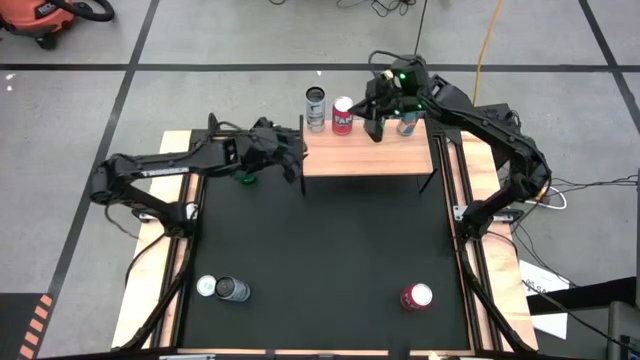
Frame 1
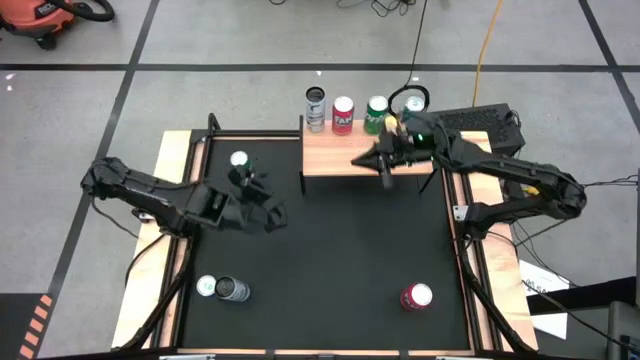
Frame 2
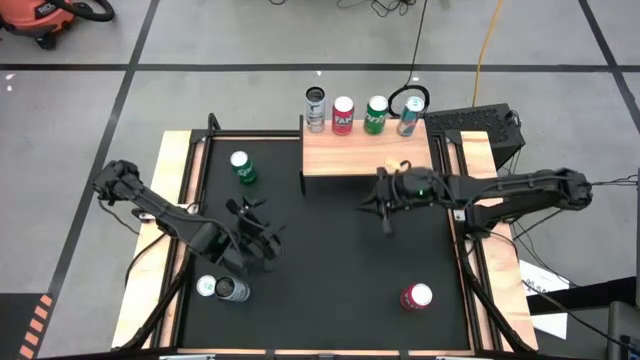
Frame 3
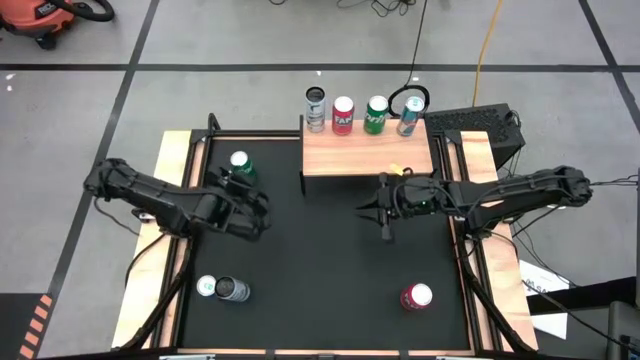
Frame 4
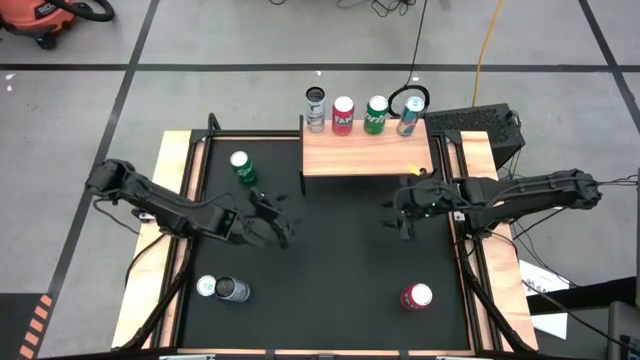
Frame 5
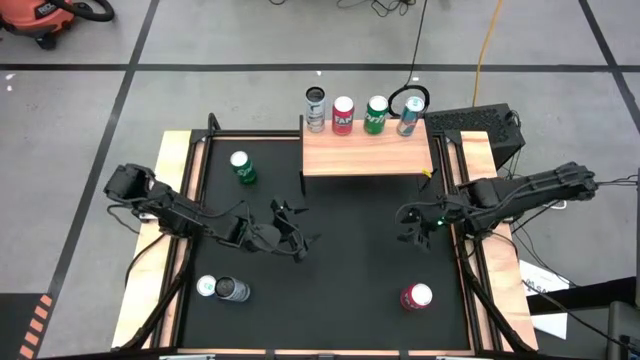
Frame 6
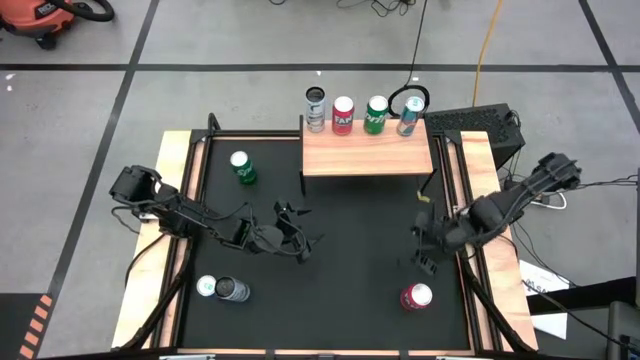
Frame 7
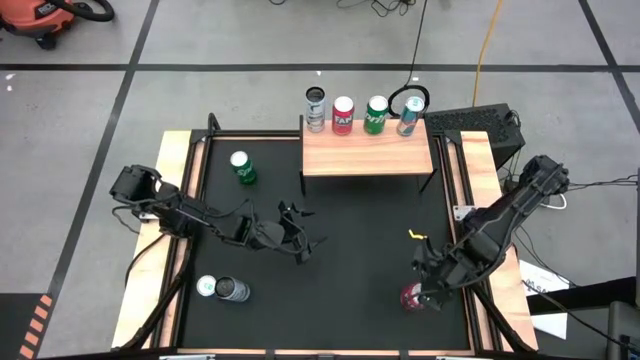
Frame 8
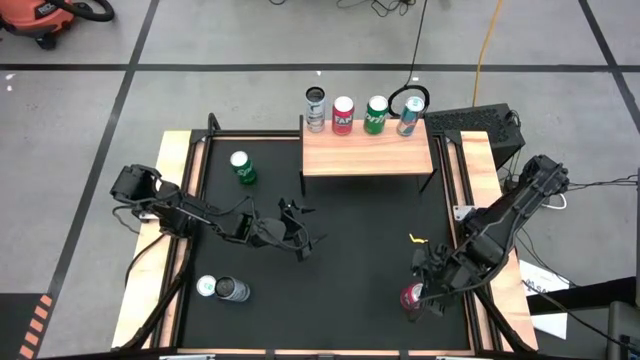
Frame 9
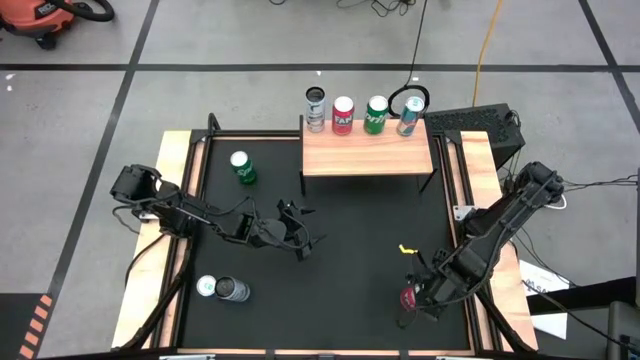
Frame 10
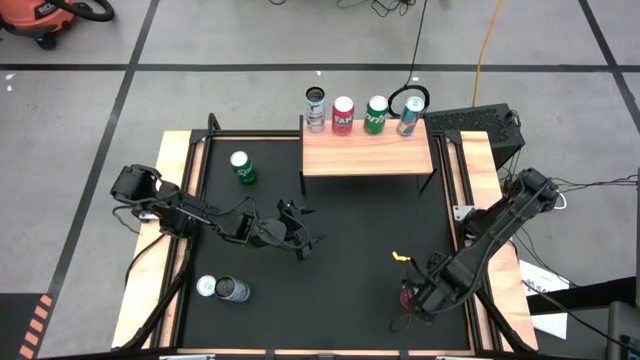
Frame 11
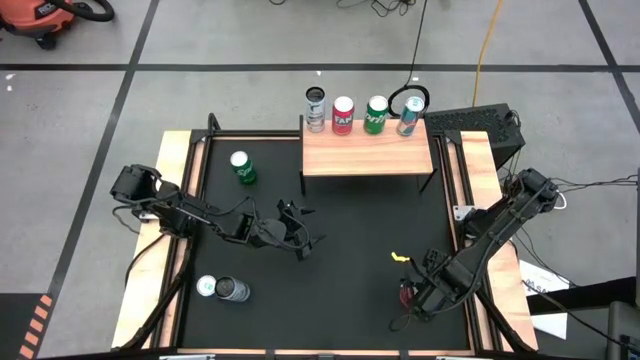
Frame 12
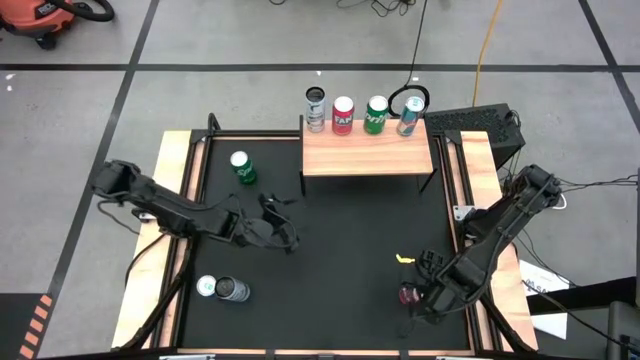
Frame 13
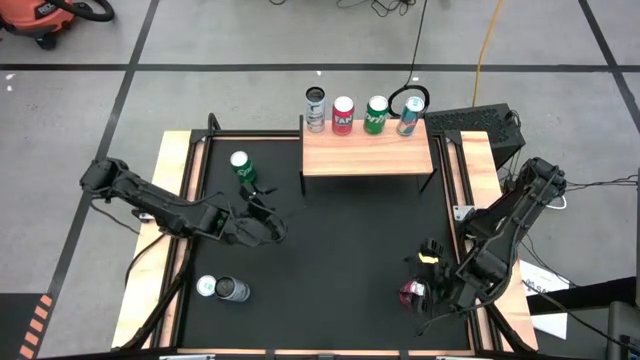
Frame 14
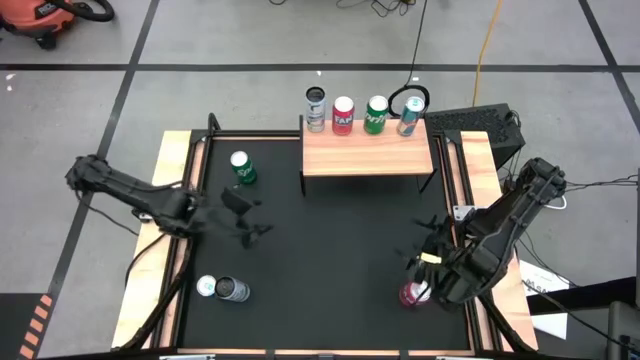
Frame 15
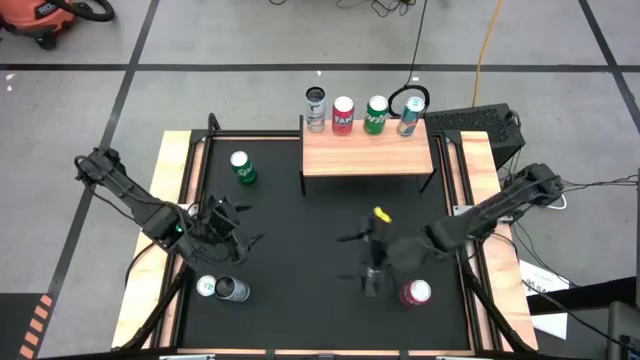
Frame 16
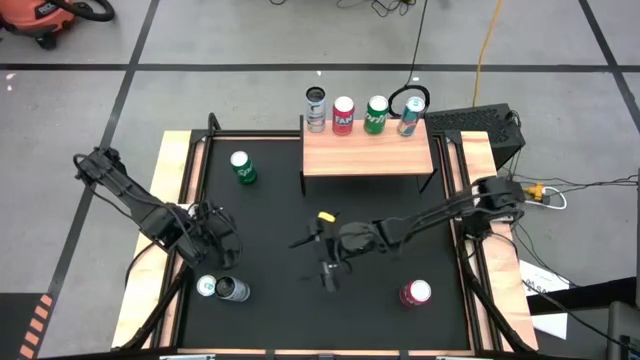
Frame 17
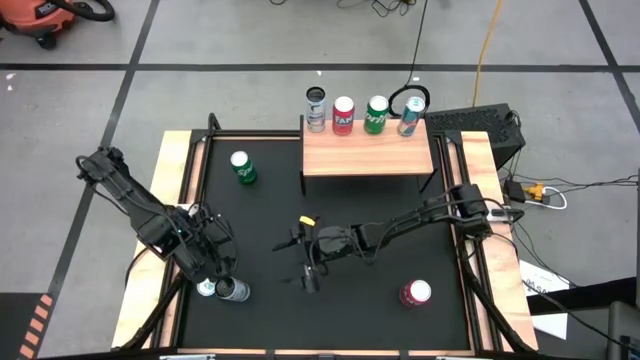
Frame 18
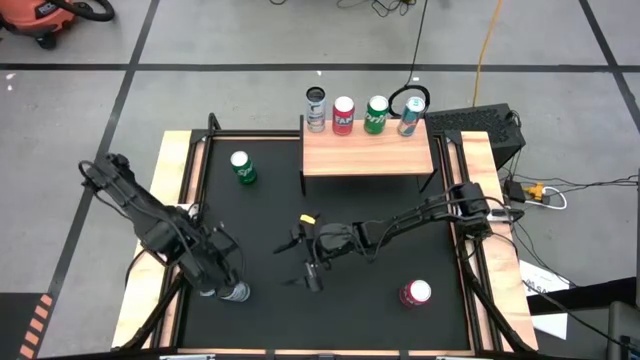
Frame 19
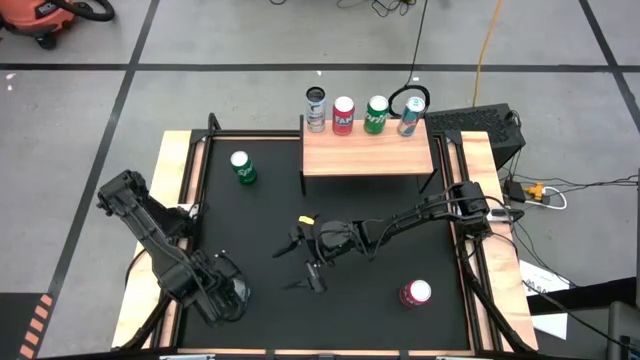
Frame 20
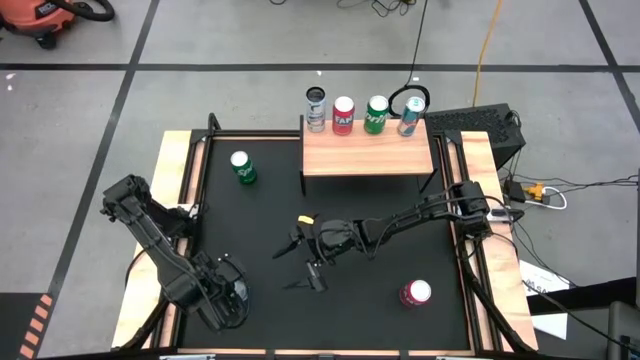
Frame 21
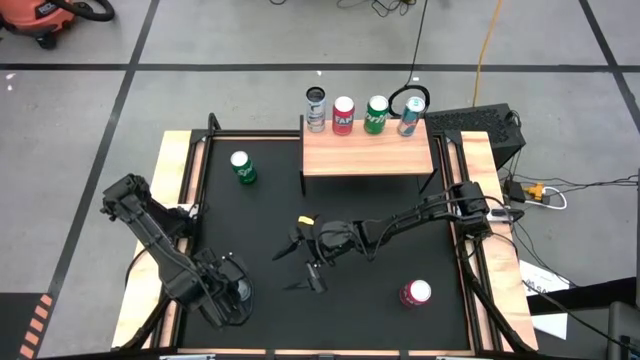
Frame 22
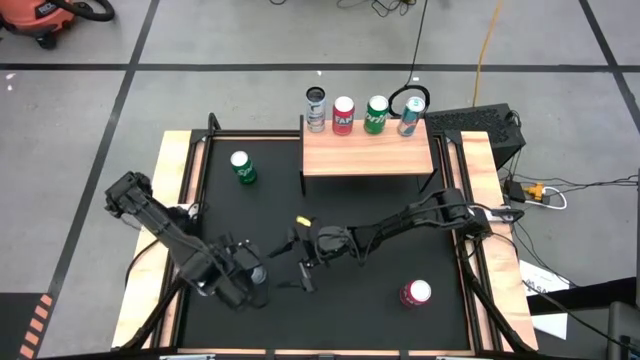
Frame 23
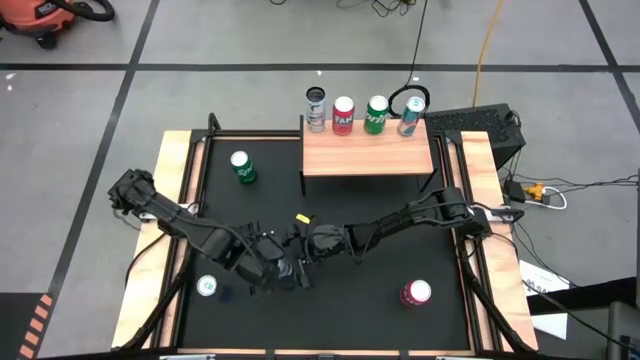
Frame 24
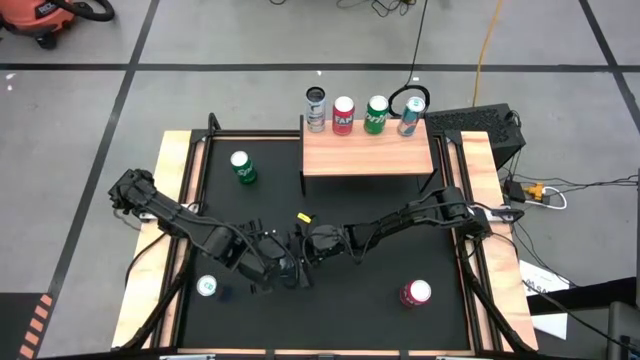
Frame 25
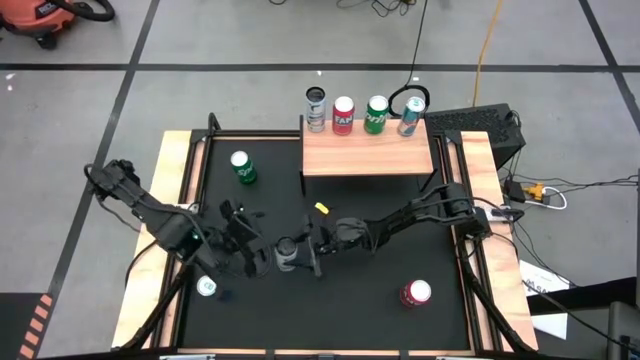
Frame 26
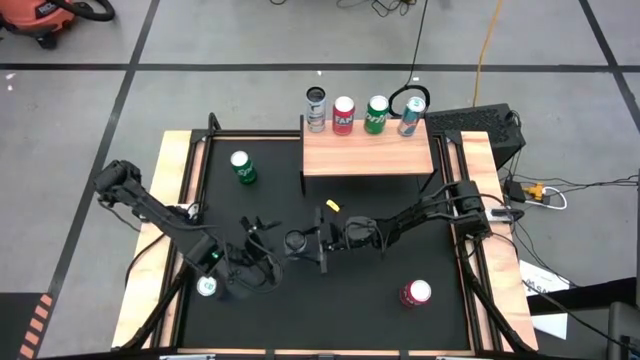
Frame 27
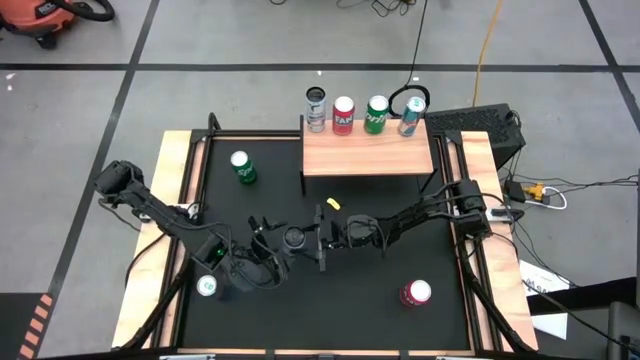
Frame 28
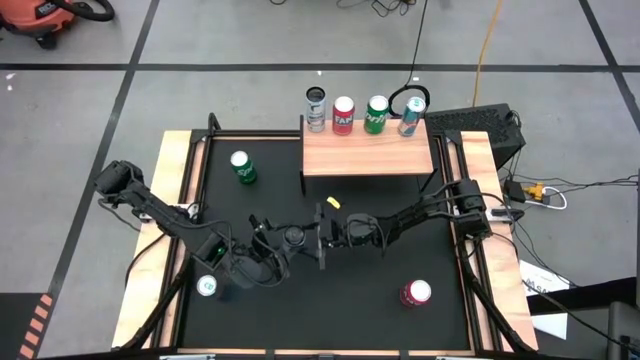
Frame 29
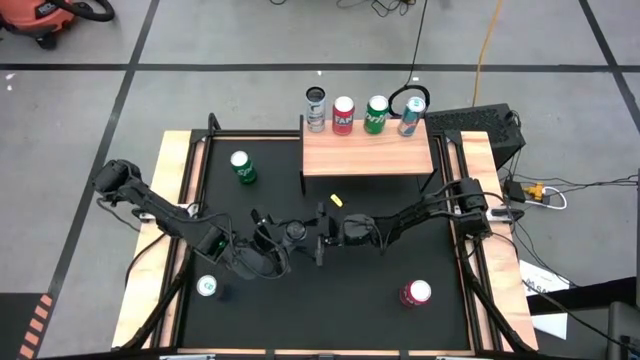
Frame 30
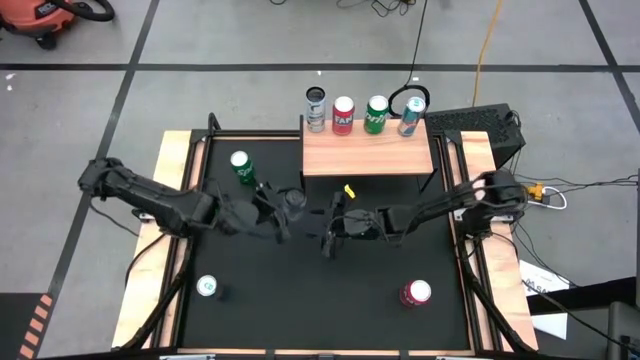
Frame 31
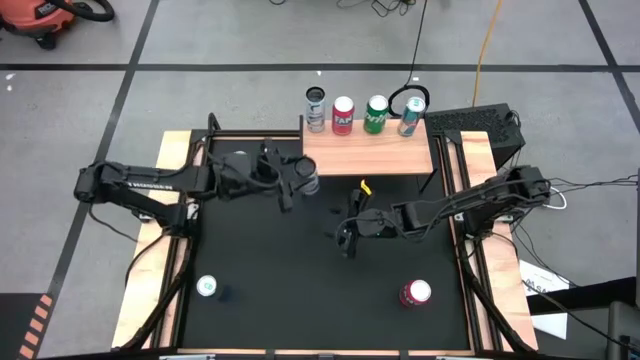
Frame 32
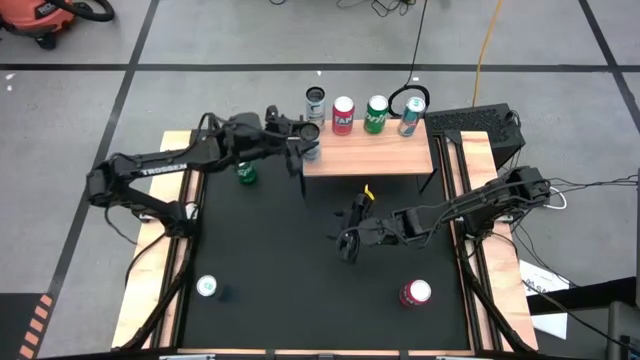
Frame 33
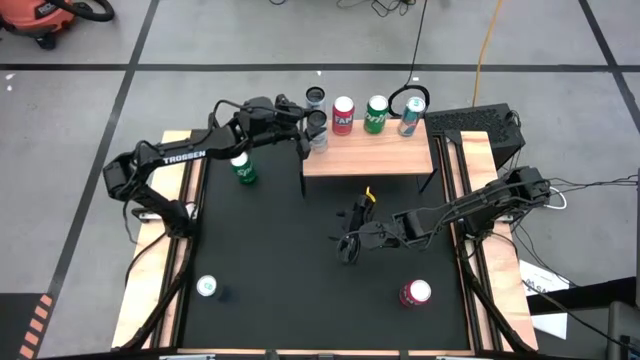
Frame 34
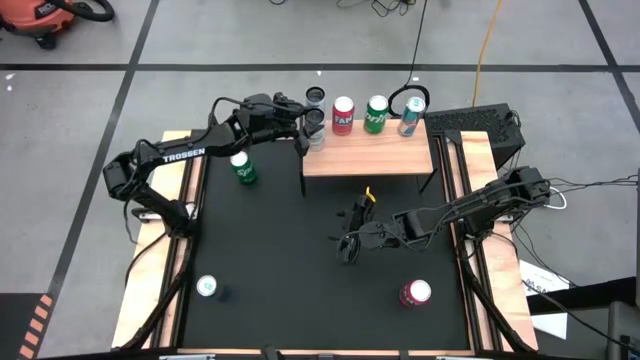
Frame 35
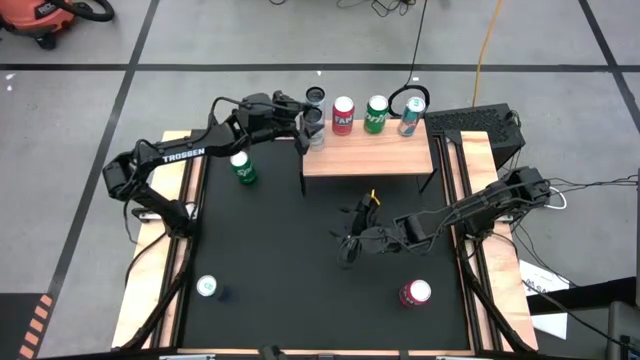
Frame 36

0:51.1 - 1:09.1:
Task: Place canned beverage on shelf
Put the black soda can on the shelf aligned with the other black soda can

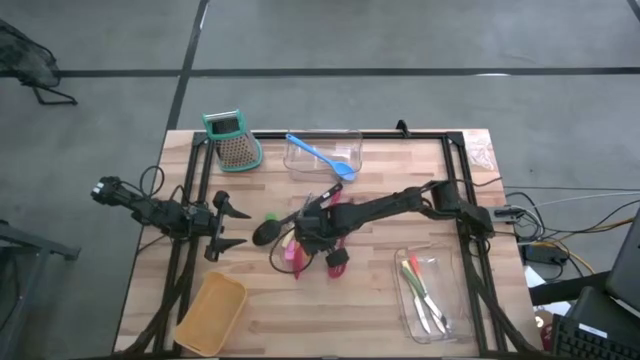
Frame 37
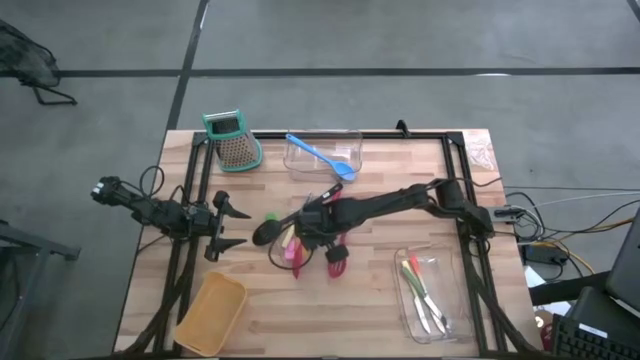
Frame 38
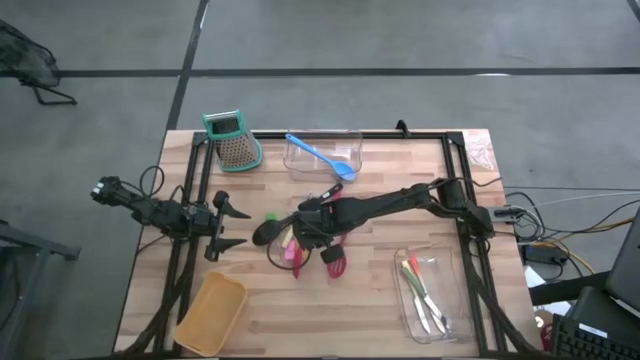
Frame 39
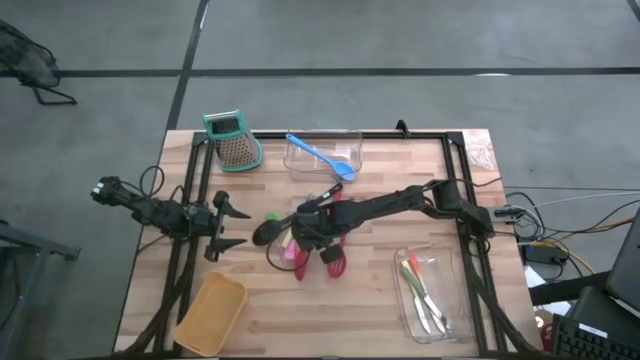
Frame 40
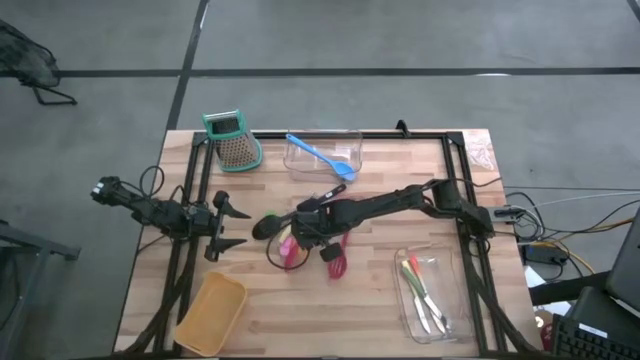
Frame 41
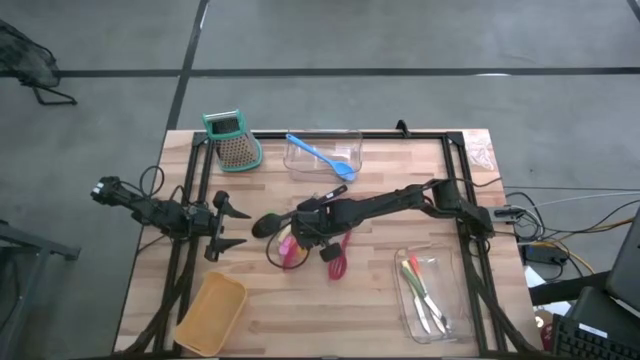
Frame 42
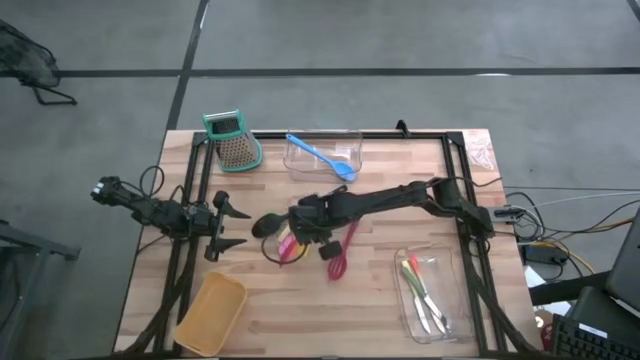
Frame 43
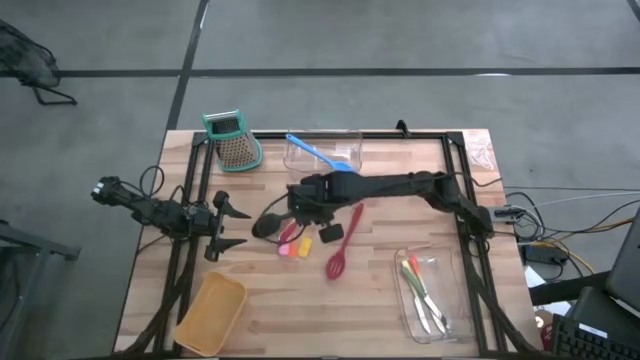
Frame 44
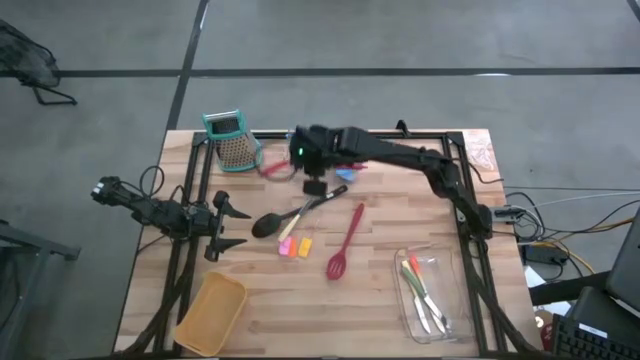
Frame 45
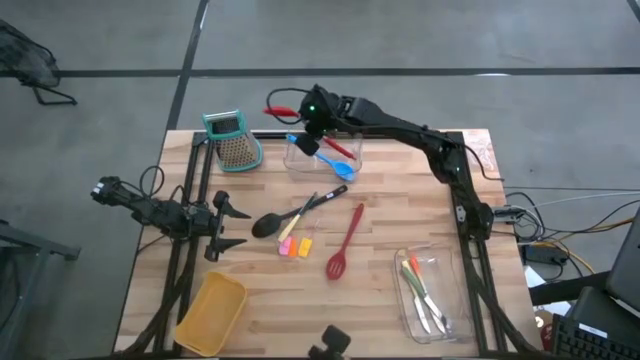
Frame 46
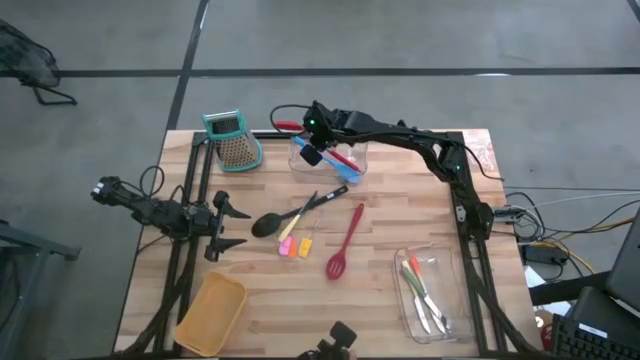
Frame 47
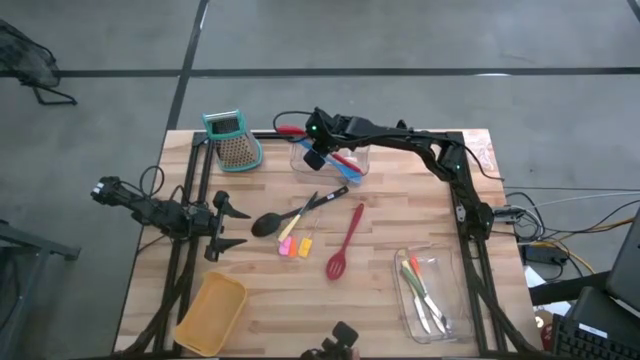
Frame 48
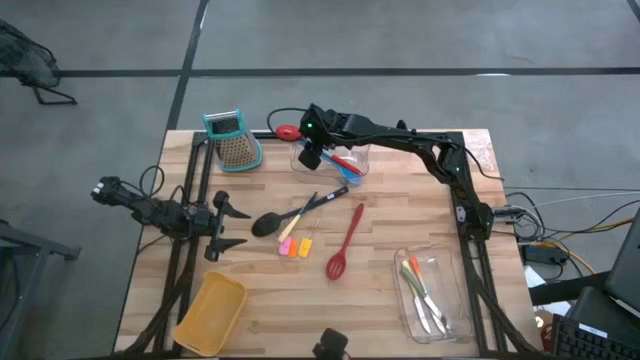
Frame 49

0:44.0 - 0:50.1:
Task: Pick & Place Kitchen Items
Put the left red slotted spoon into the top transparent bin
